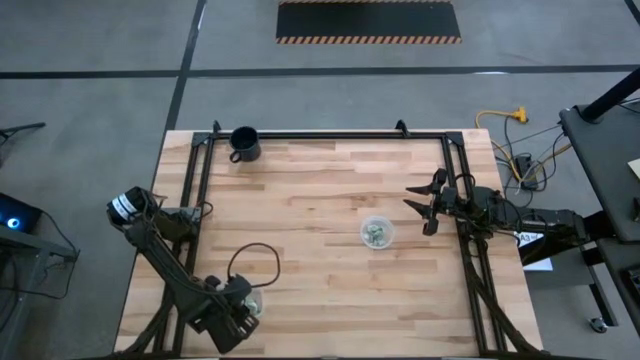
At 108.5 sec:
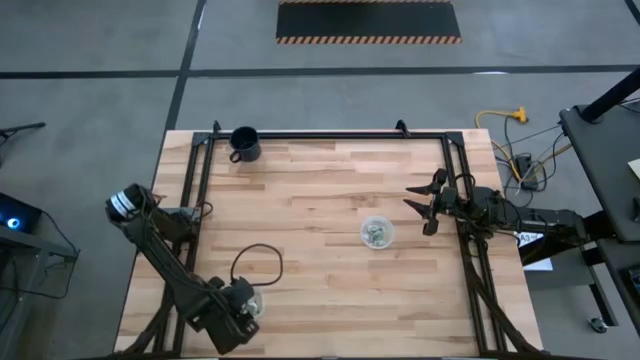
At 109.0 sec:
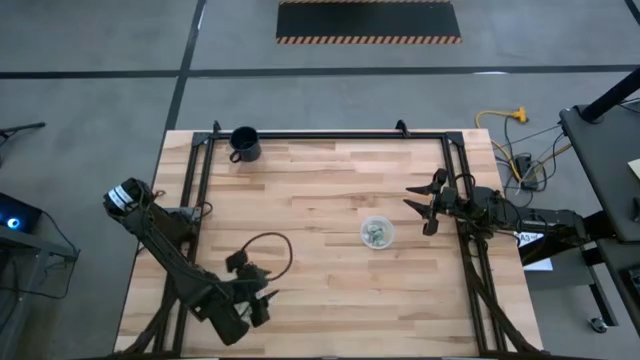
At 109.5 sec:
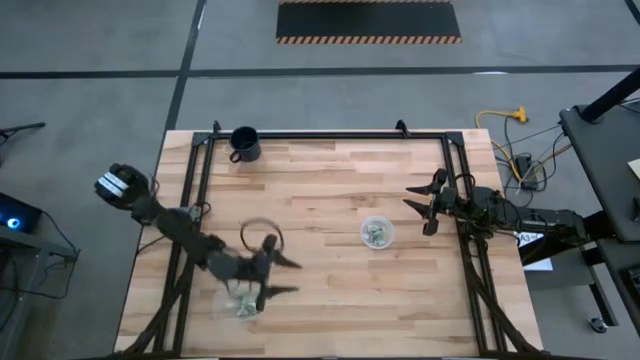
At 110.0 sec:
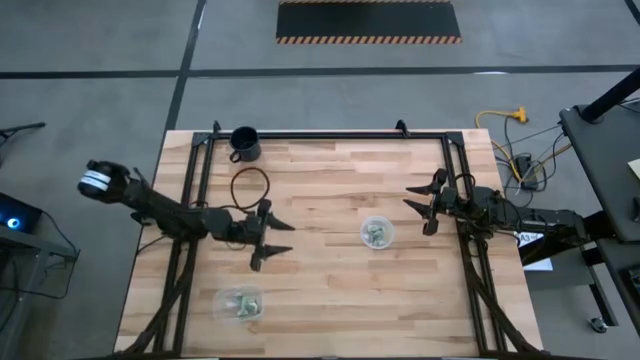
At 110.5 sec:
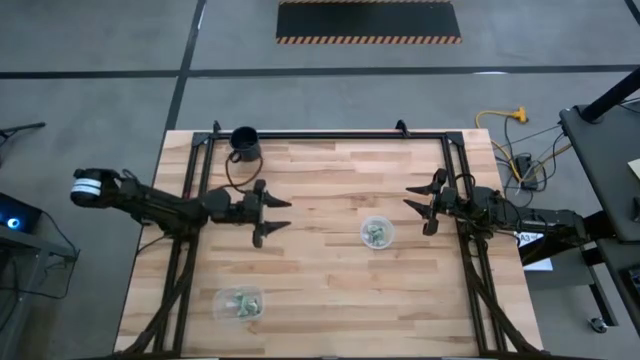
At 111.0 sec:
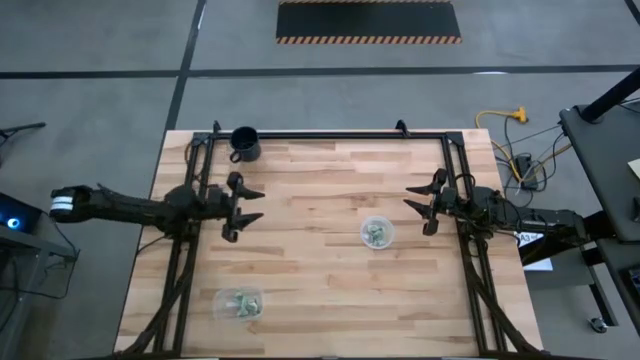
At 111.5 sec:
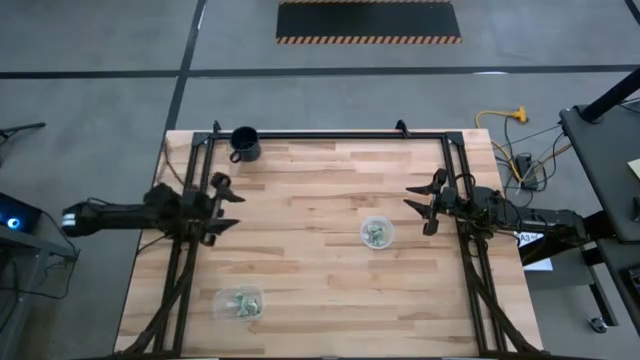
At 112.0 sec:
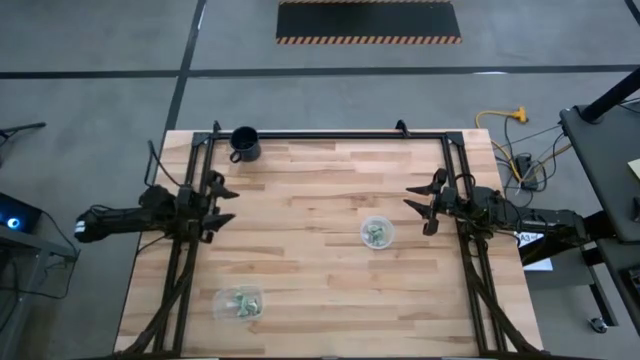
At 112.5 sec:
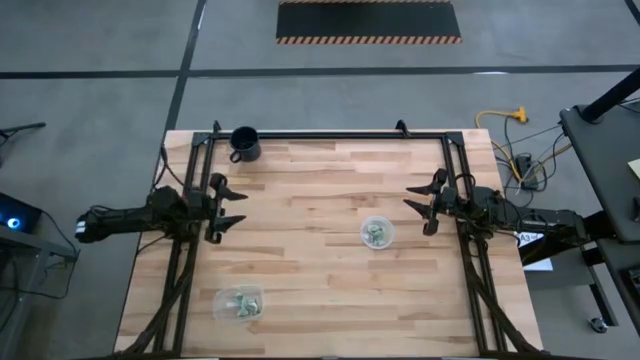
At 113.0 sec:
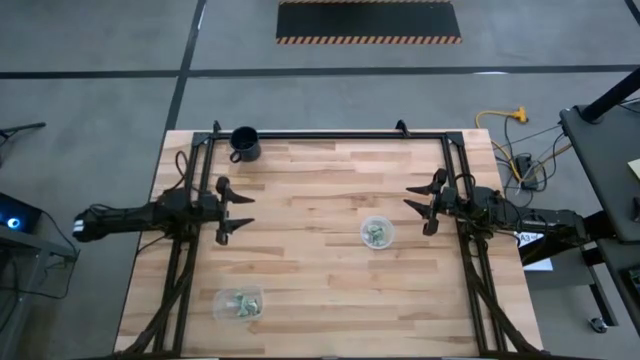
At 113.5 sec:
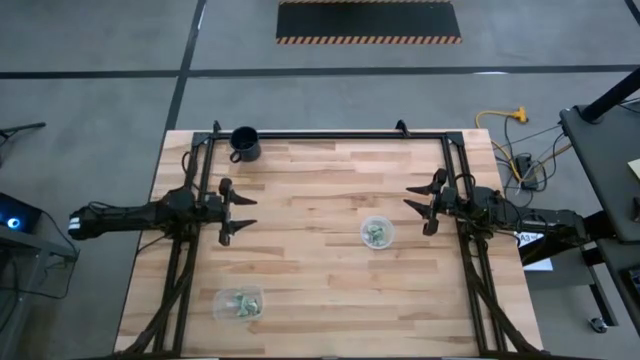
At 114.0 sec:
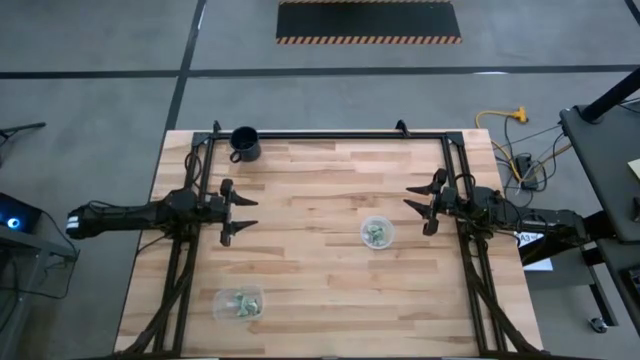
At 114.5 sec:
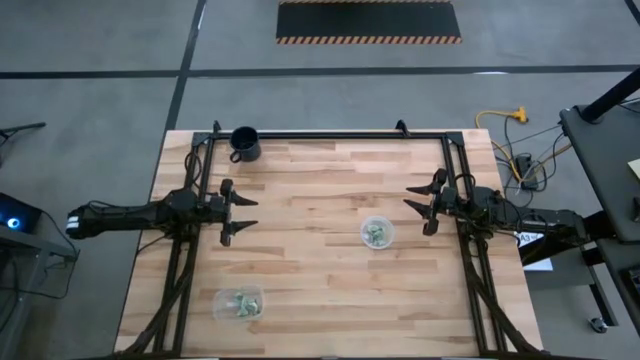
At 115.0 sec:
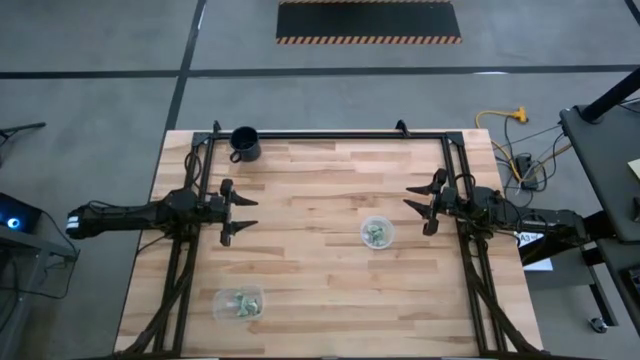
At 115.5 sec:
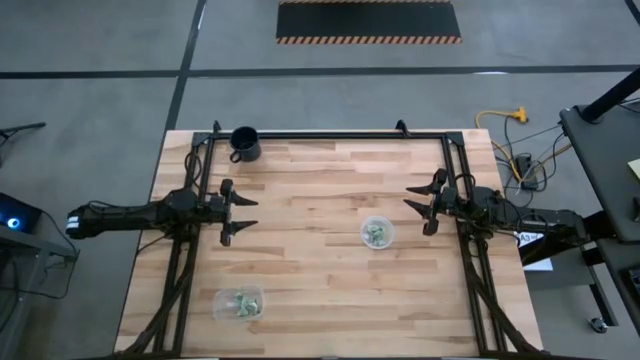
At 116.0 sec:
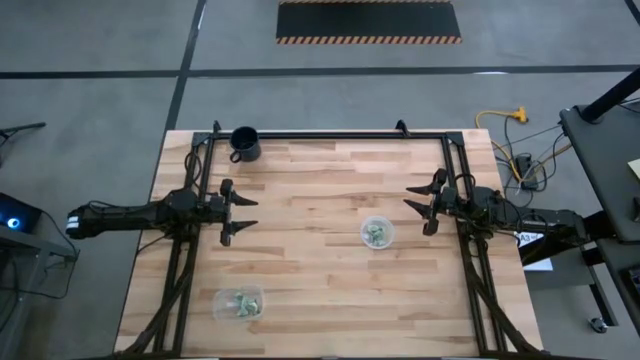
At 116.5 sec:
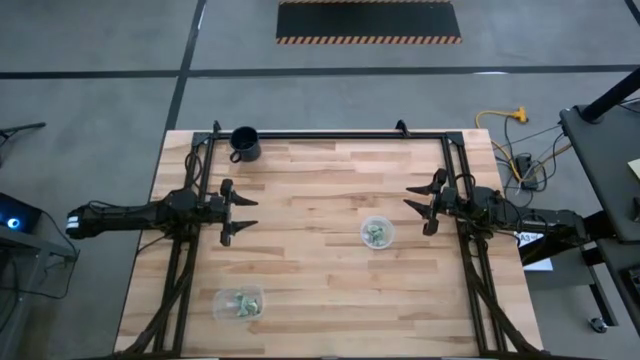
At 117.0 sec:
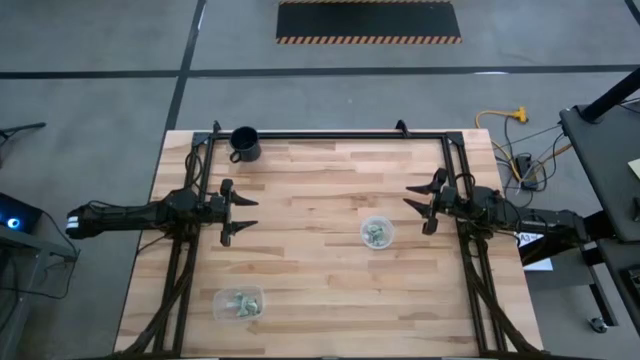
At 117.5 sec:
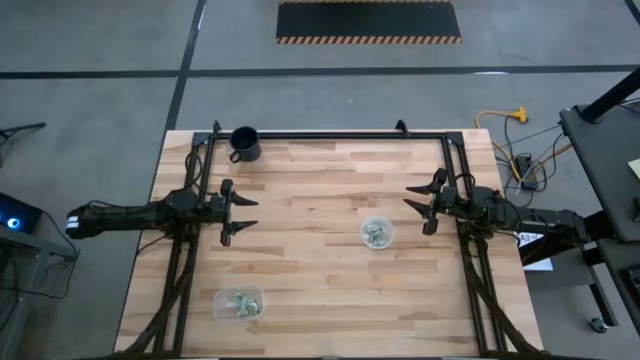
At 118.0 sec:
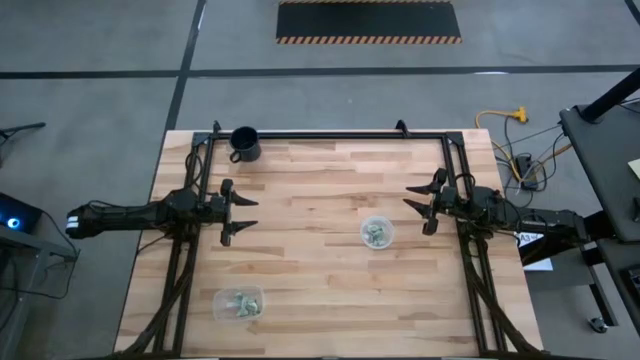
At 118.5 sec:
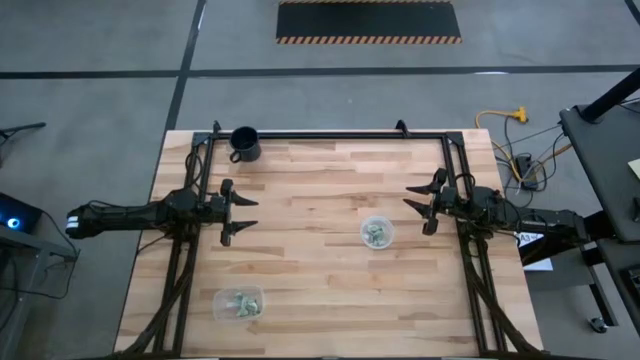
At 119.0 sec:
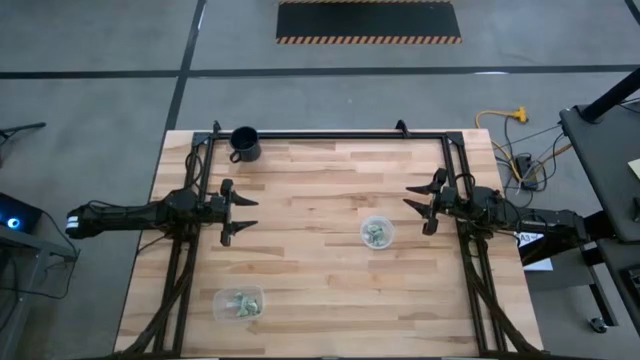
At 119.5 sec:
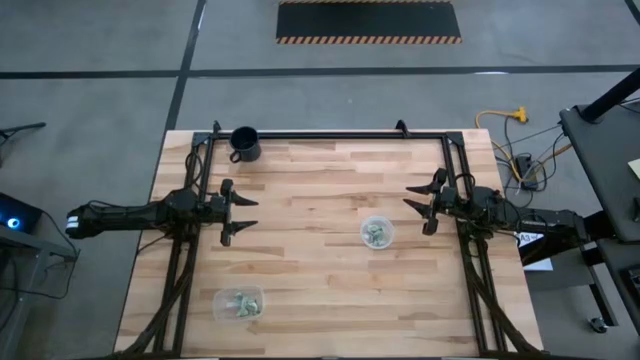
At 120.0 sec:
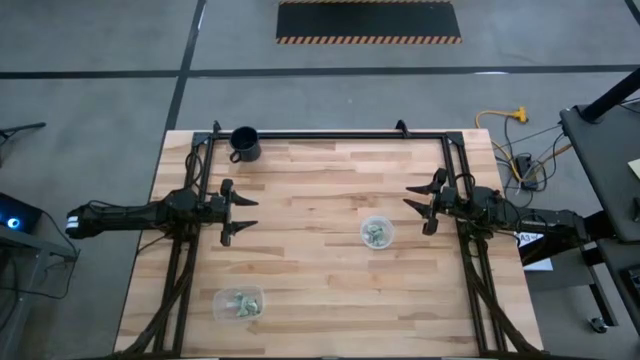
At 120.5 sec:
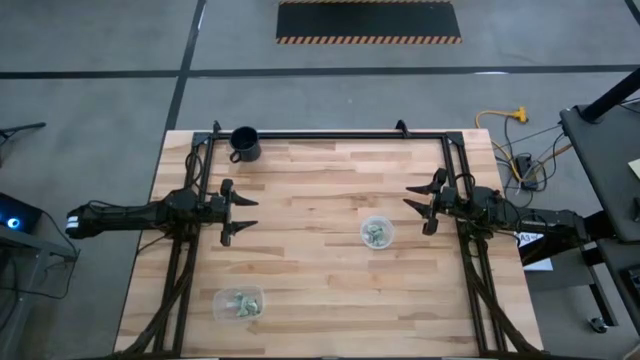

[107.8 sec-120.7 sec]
Task: Pick and place Stevia / Truvia into bins
Return to Home Position

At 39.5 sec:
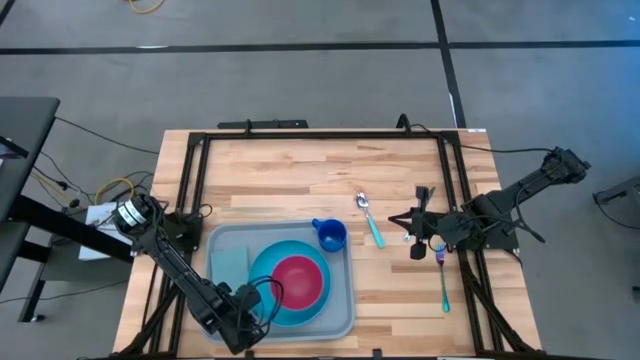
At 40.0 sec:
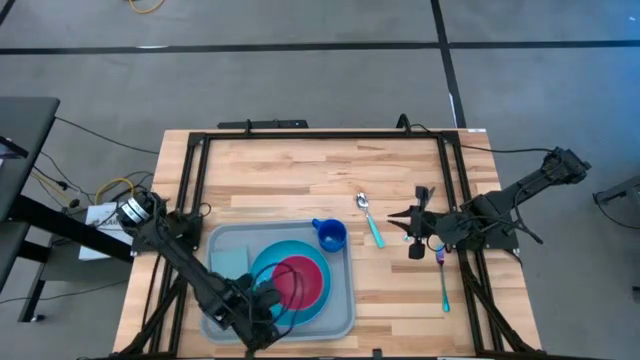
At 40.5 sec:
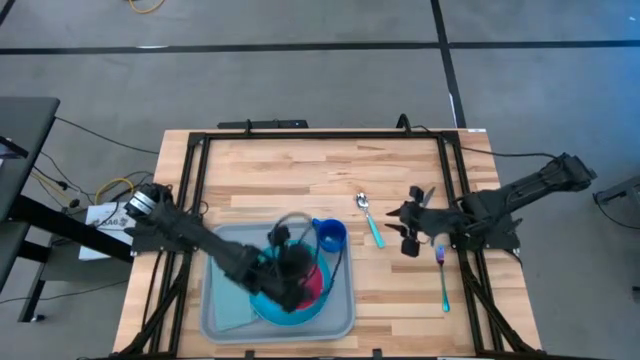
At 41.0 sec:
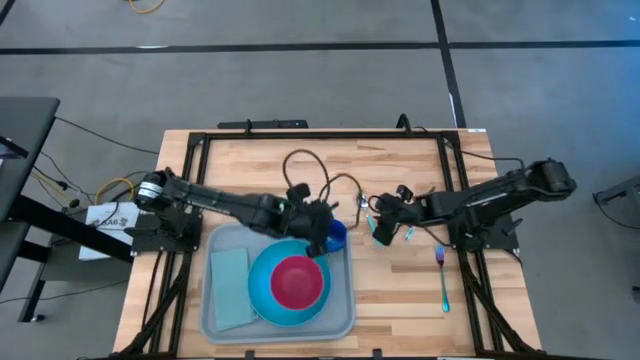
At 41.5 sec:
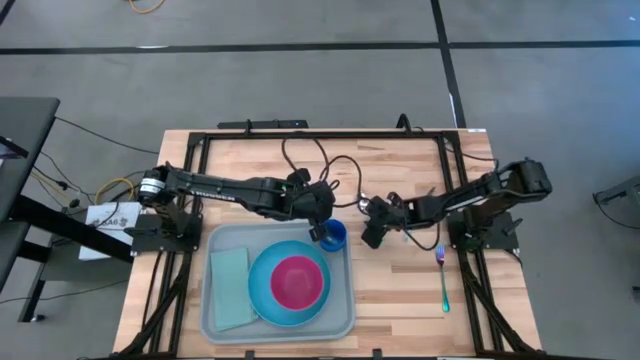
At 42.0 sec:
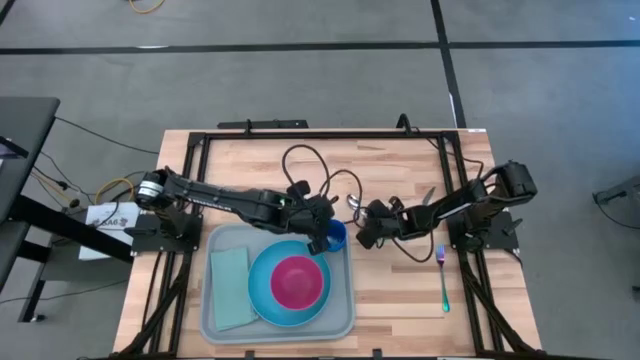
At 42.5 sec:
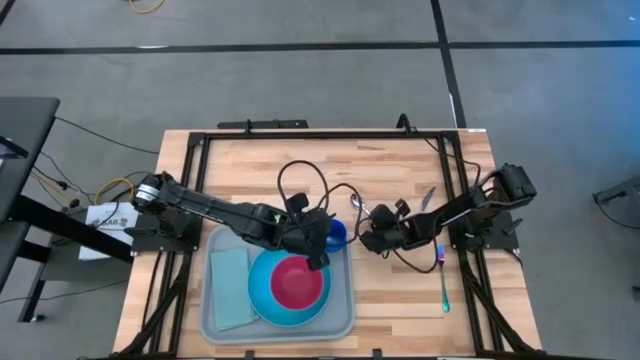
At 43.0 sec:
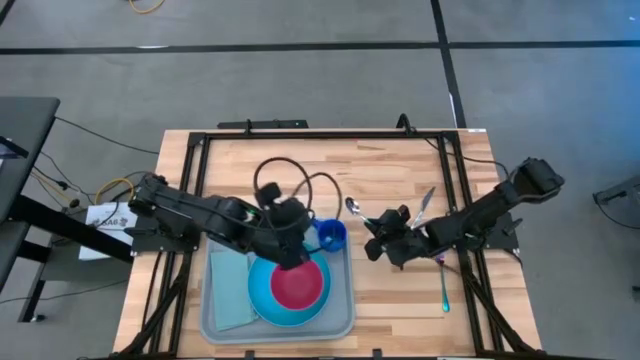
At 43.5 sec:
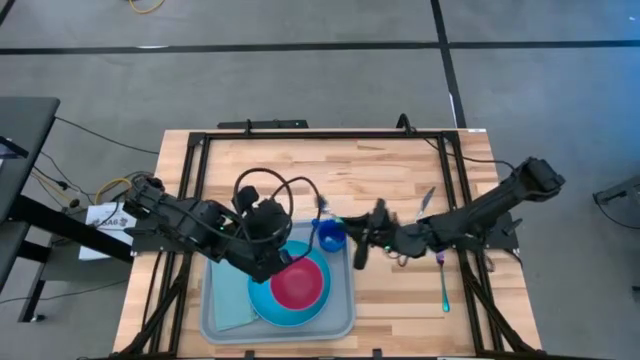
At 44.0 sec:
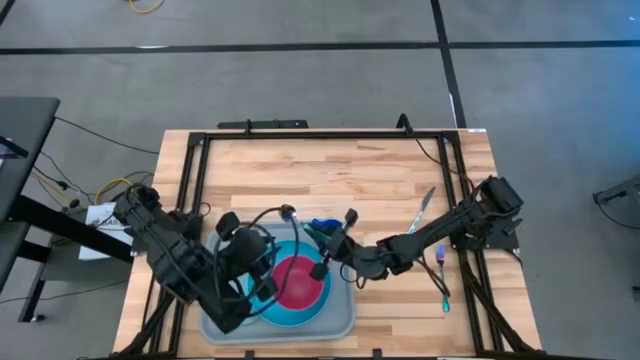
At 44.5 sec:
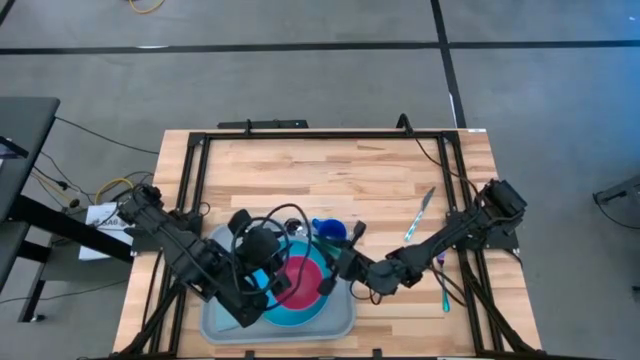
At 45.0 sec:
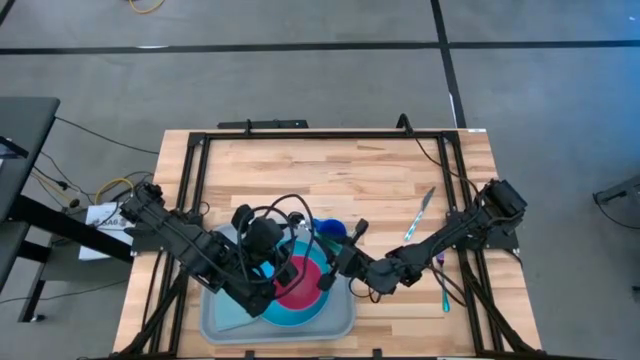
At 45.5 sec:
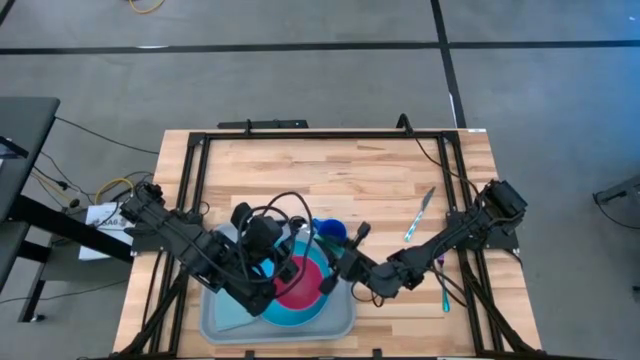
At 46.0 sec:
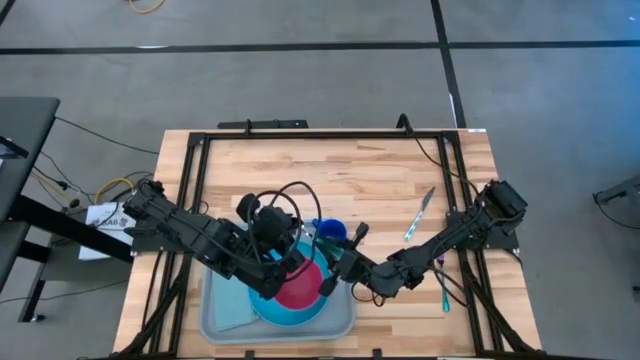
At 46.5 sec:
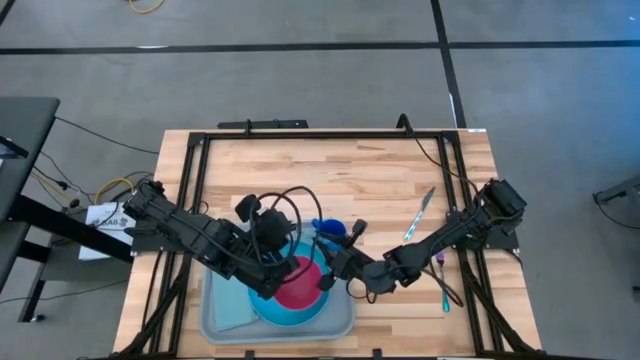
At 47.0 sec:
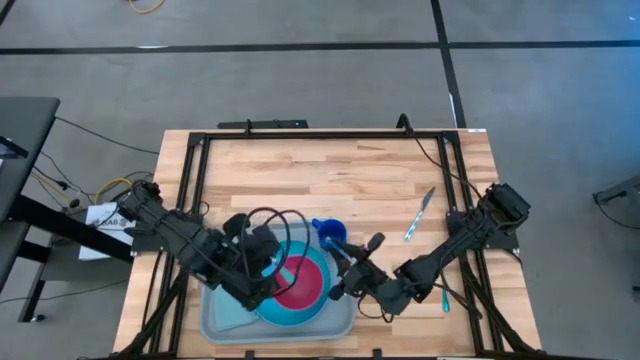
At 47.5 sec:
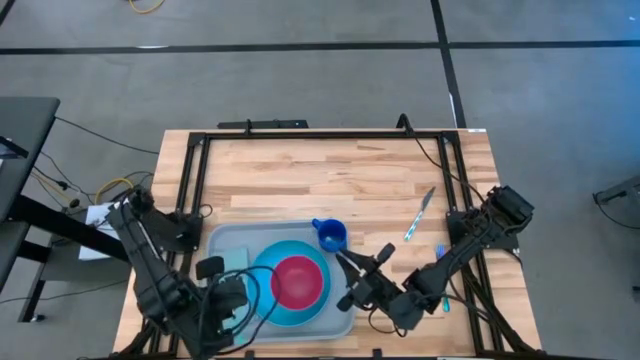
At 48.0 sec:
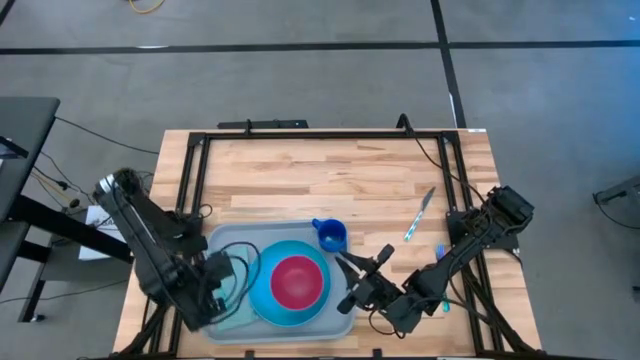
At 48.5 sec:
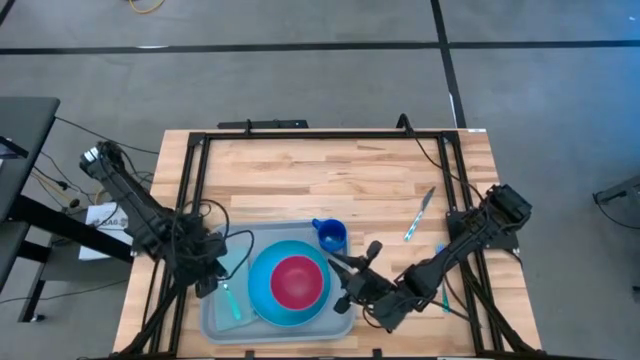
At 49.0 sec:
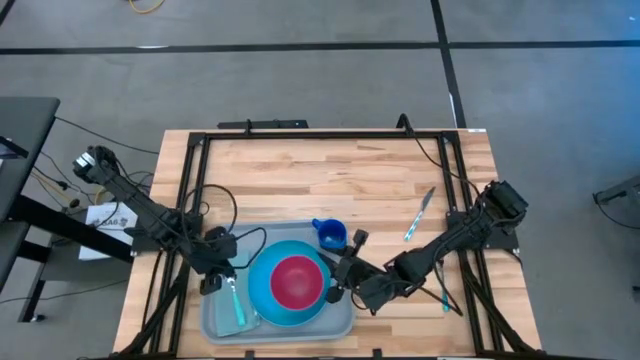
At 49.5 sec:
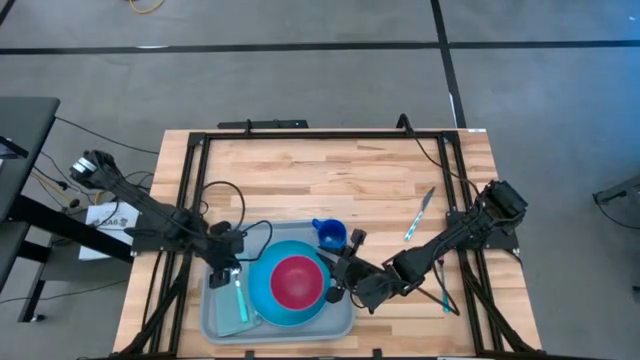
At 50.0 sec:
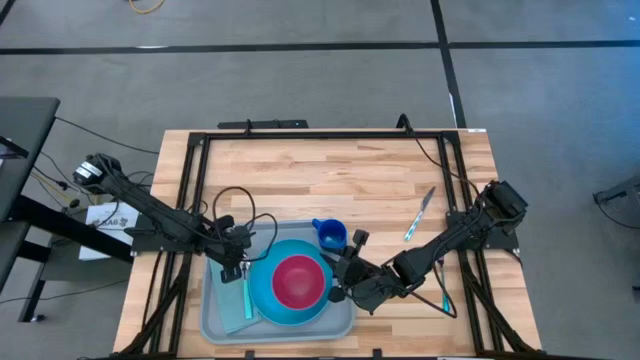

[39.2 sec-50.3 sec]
Task: Set up tray
Put the green spoon on the blue napkin on the gray serving tray
